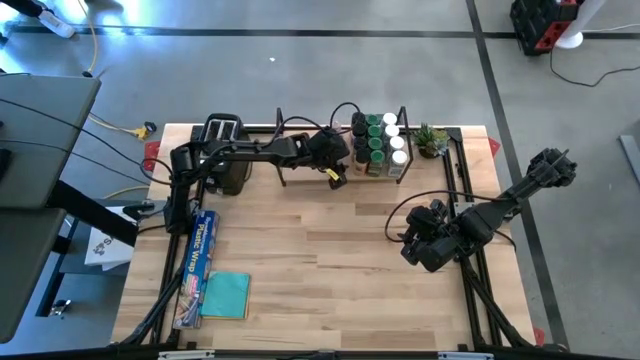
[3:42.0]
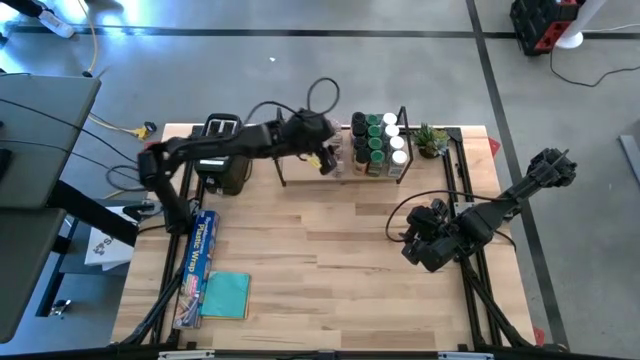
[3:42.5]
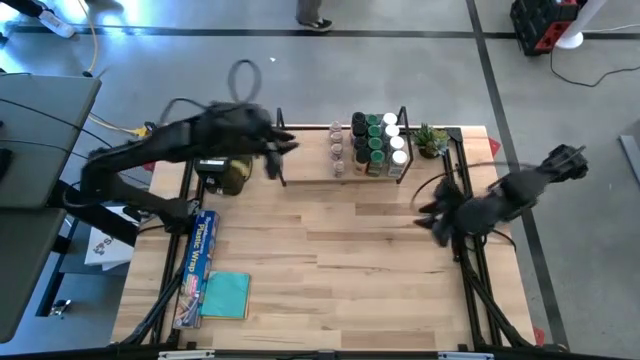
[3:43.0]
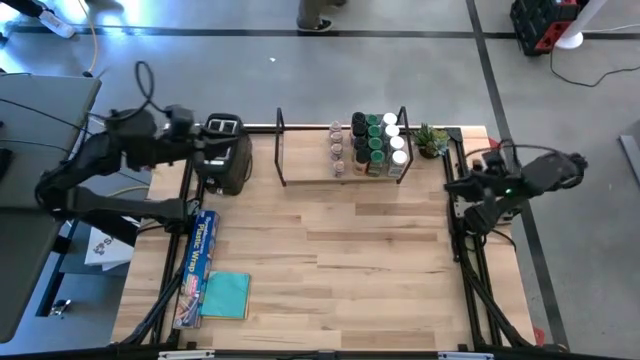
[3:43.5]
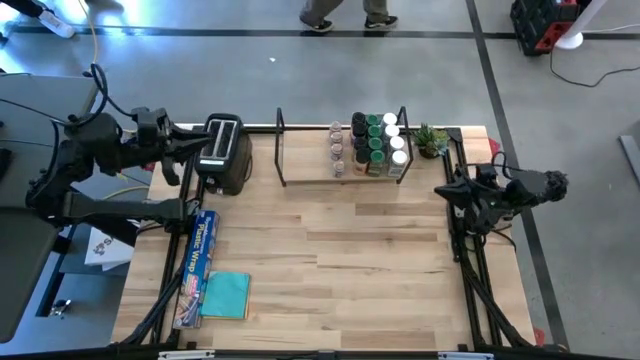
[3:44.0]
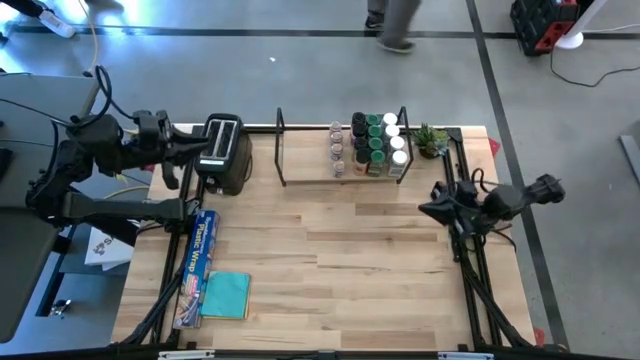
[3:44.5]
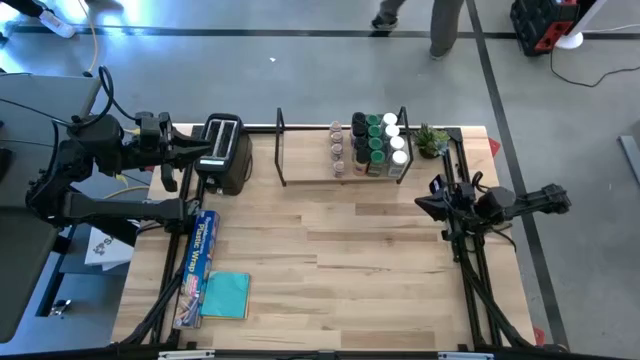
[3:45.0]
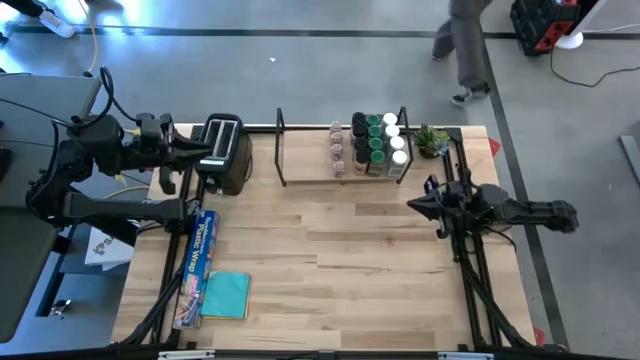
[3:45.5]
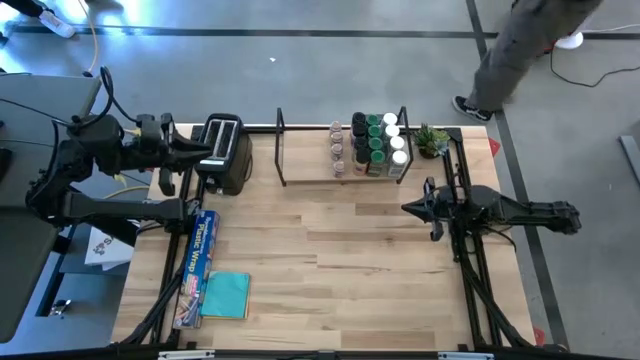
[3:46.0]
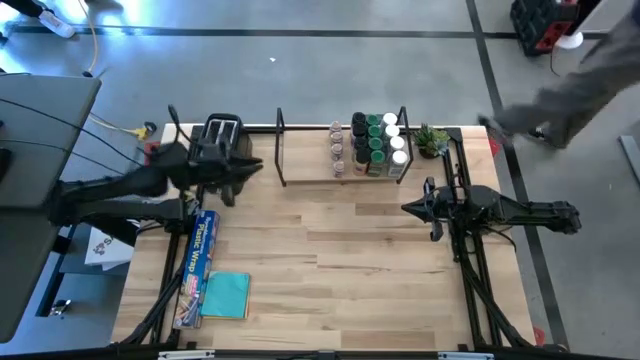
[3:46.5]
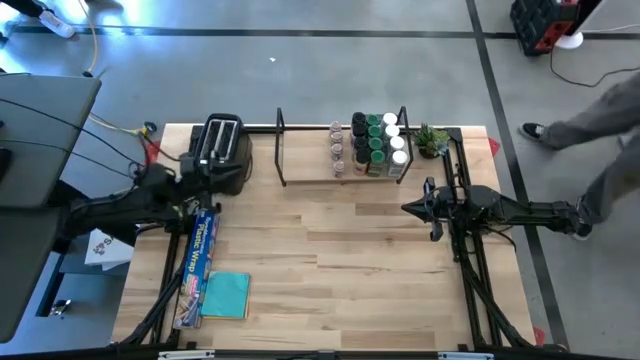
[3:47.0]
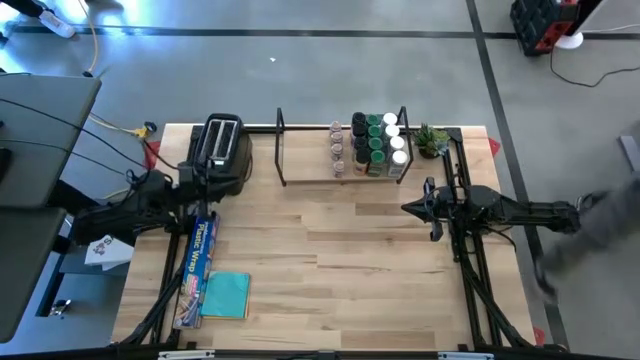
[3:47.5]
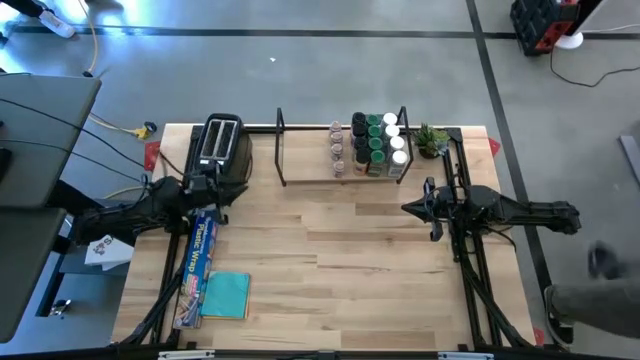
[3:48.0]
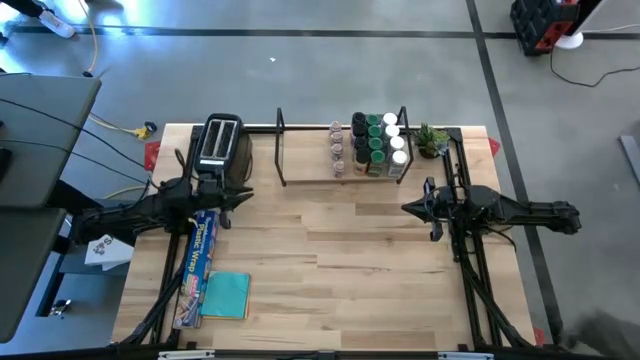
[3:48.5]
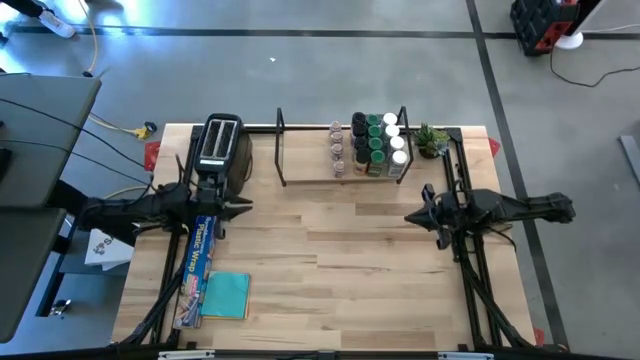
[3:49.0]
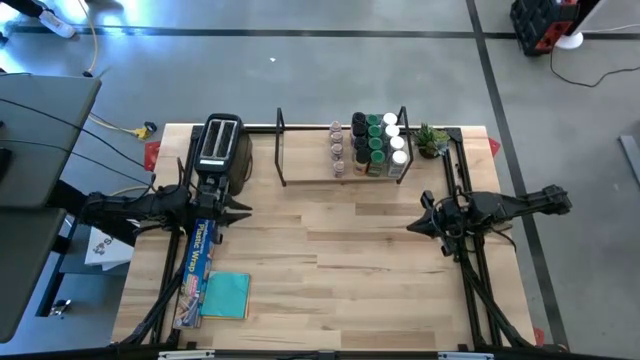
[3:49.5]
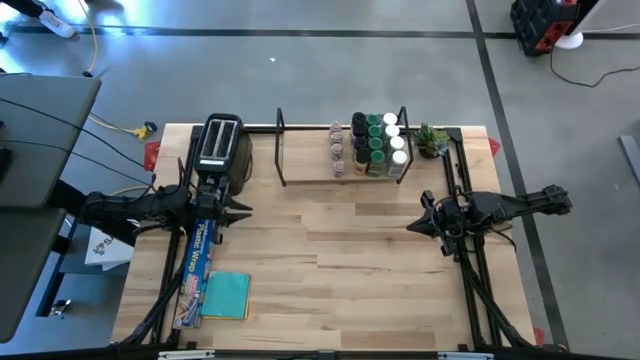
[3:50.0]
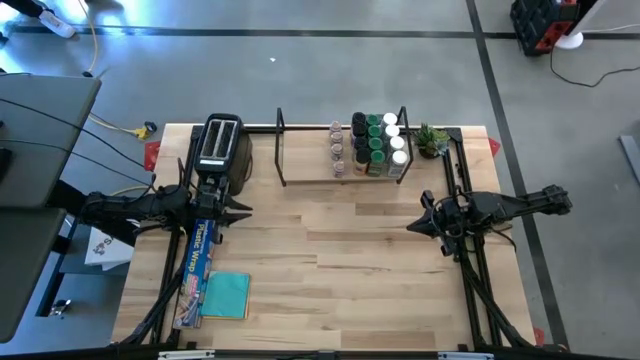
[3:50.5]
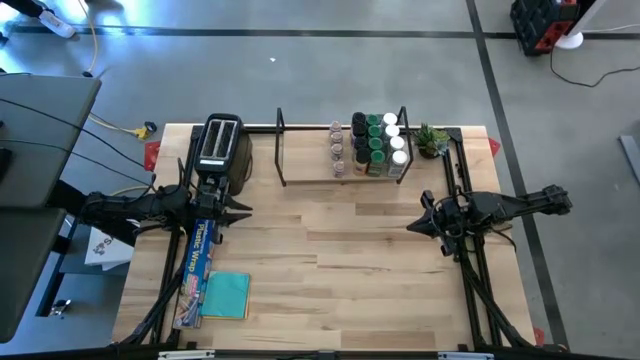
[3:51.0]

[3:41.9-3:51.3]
Task: Shelf spices
Return to Home Position

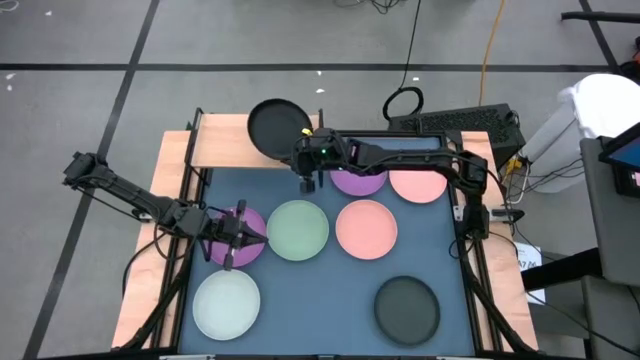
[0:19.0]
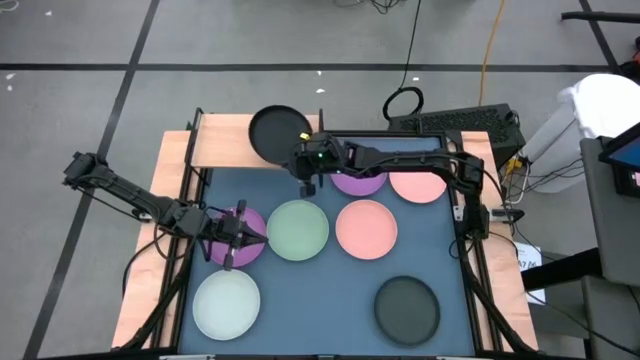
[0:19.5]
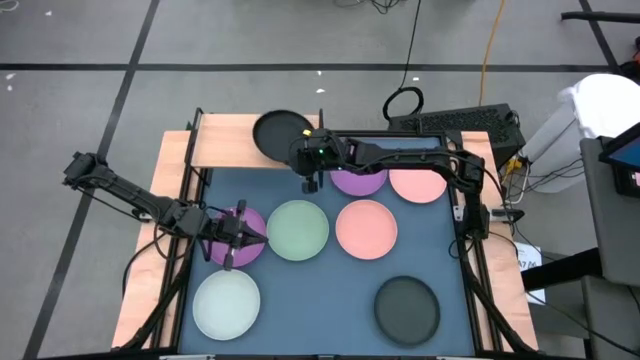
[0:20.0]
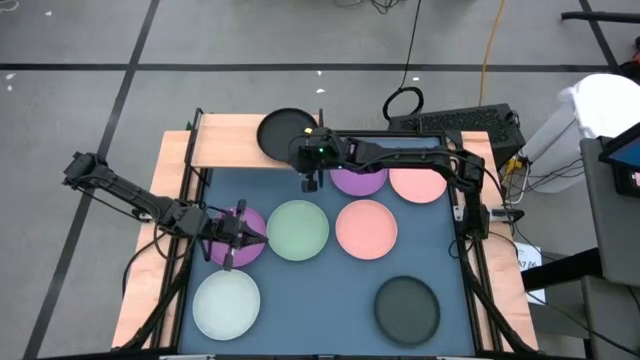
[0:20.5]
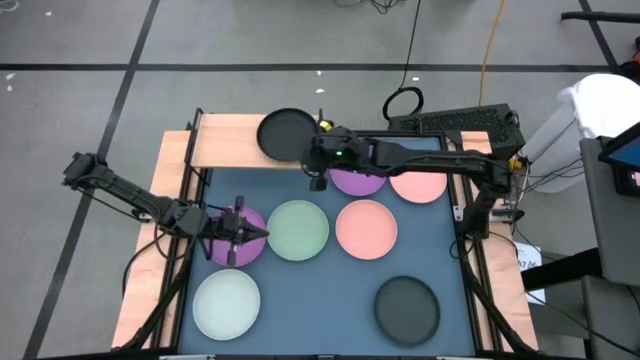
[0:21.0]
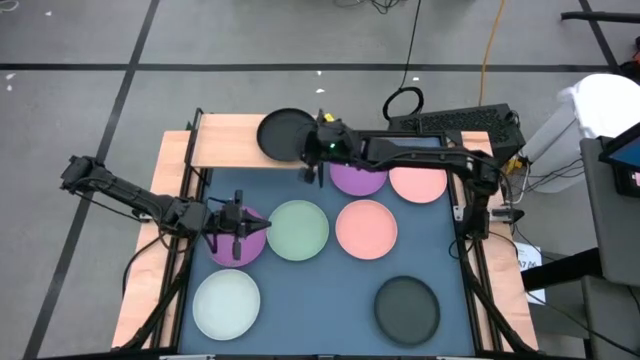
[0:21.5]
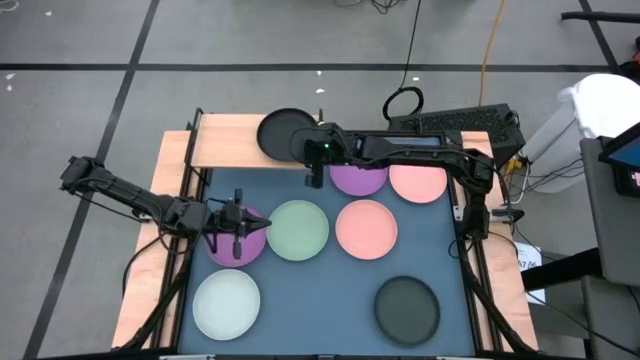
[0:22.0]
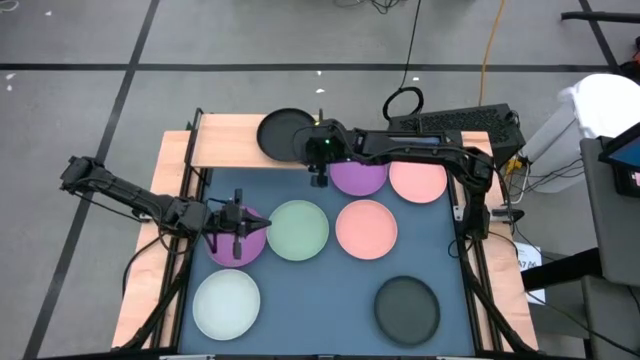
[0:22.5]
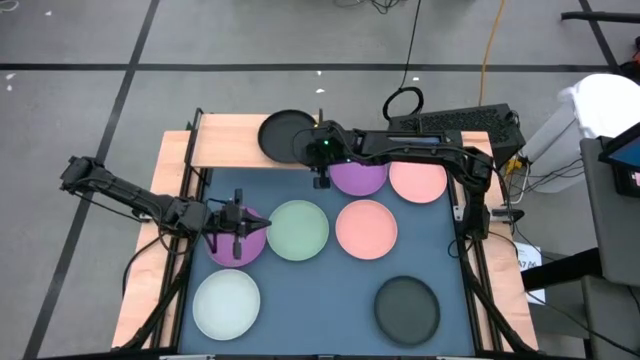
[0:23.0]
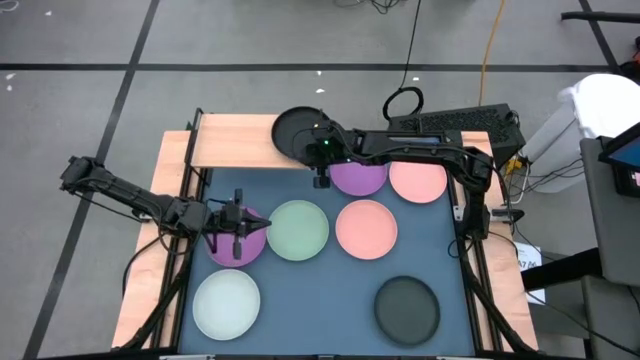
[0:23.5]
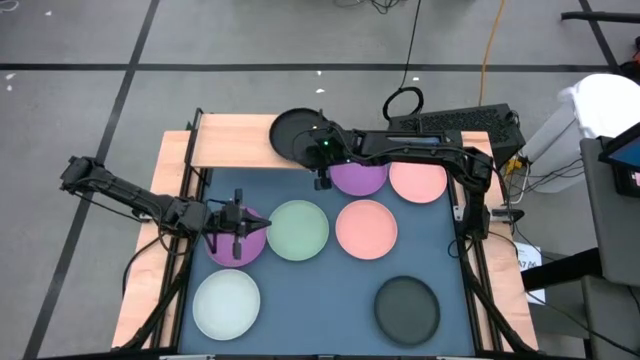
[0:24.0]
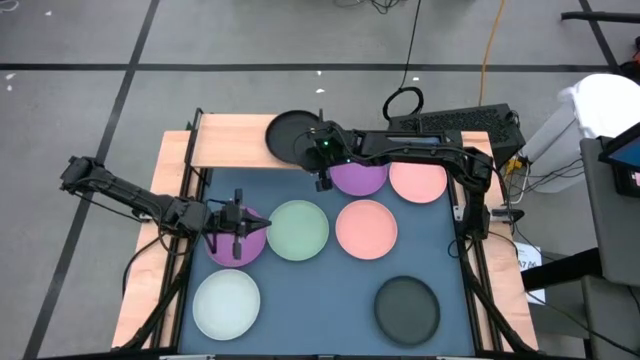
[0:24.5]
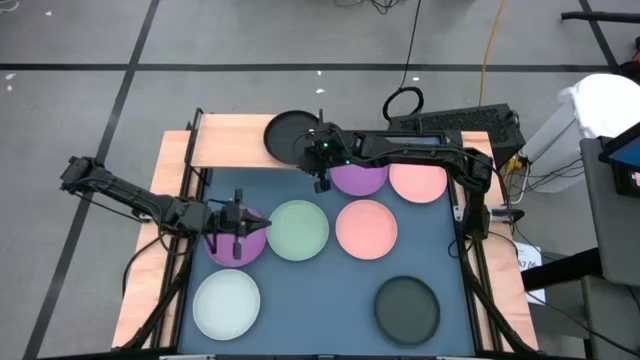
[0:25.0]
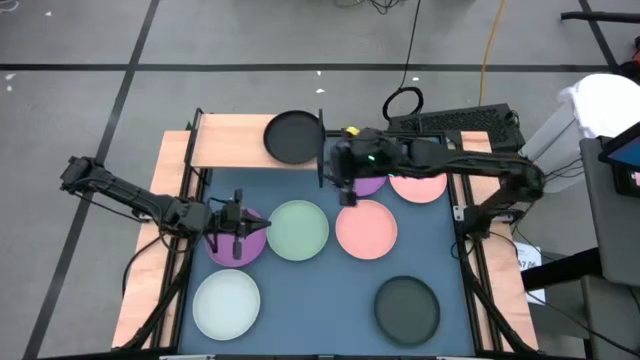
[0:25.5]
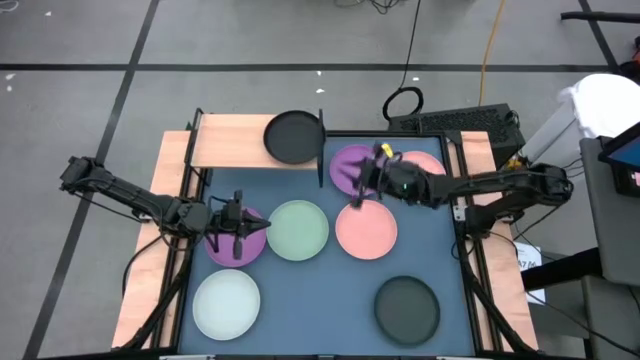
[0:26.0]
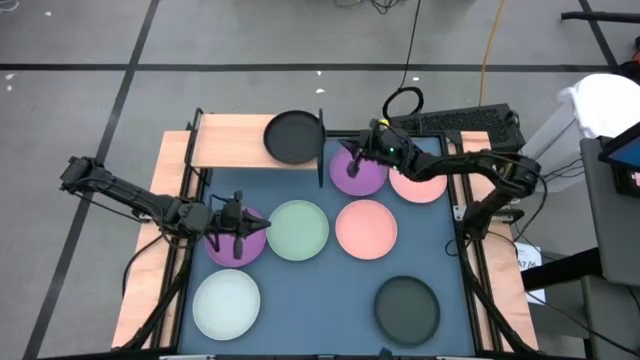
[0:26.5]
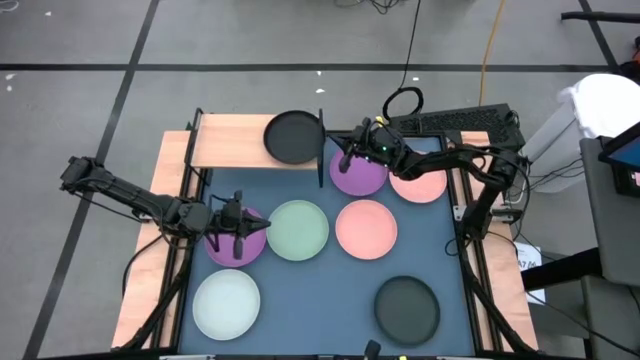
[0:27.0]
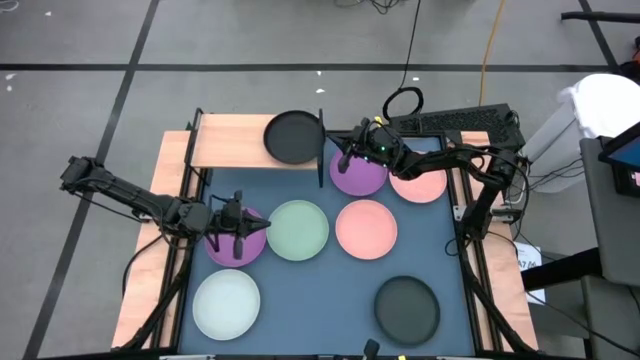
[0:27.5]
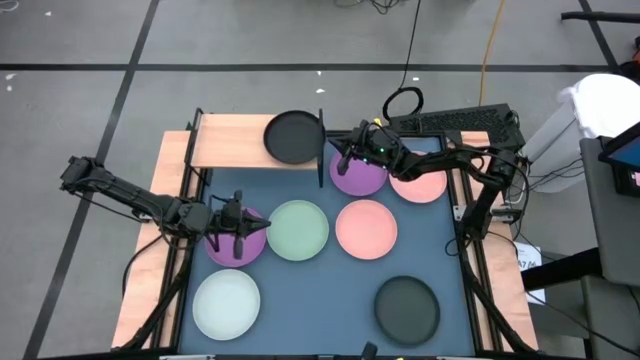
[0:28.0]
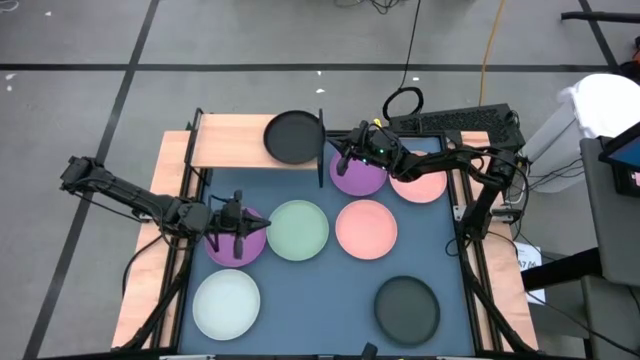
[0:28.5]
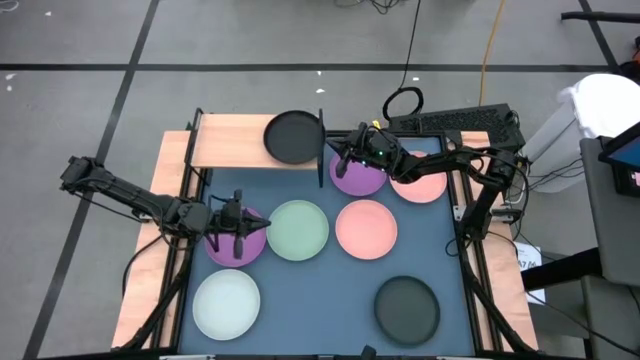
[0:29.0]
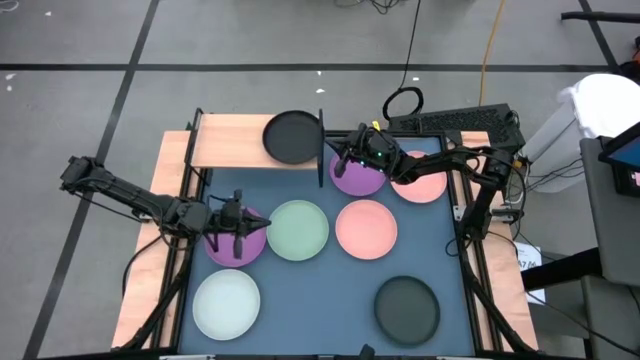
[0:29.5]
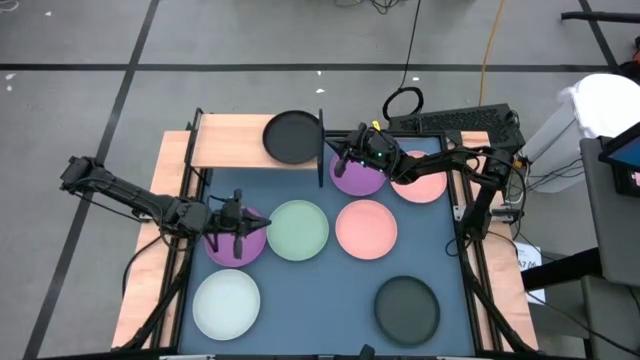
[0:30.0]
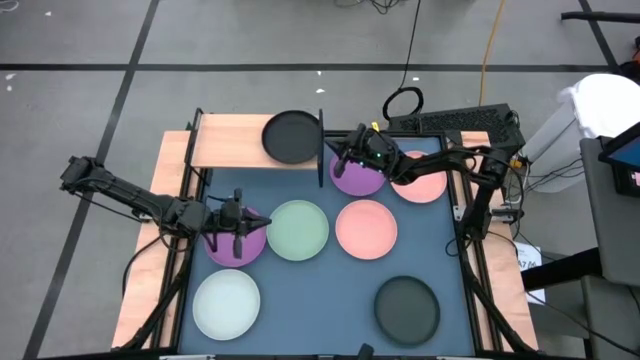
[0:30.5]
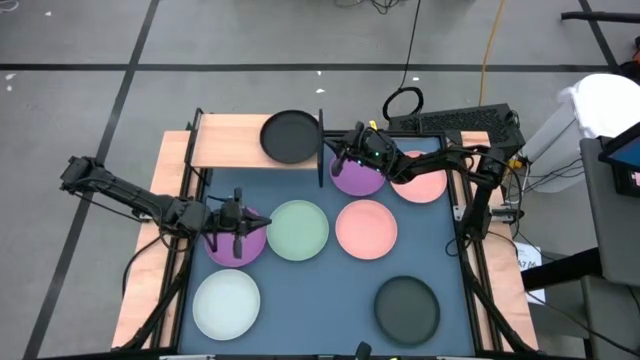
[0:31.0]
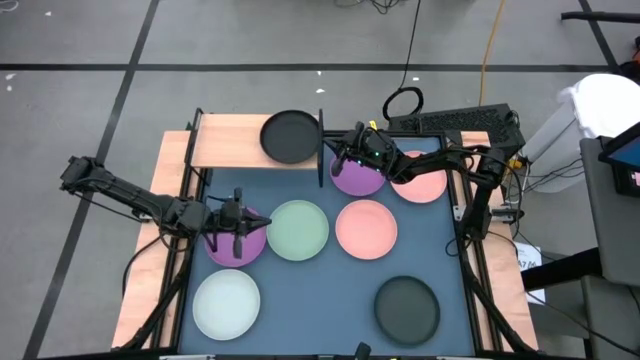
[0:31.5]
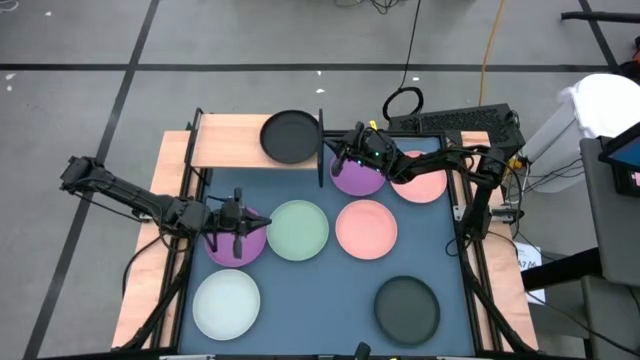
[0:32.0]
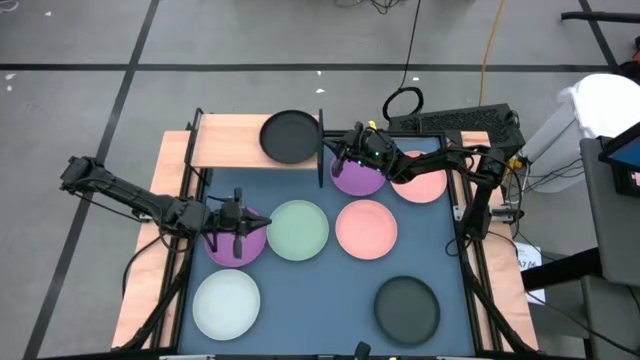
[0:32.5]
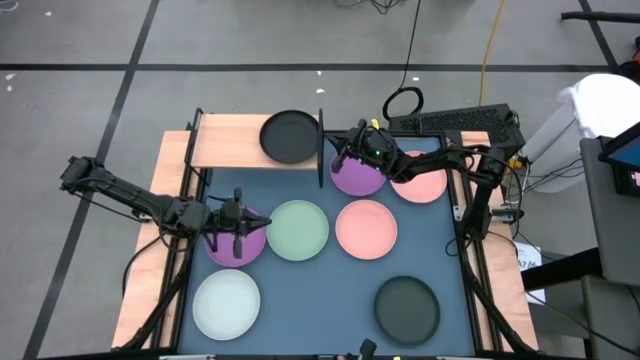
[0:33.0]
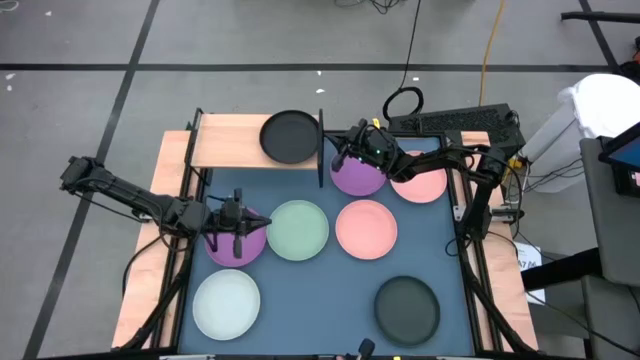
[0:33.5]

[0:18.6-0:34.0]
Task: Place and stack plates onto a shelf
Put the left black plate on the shelf
